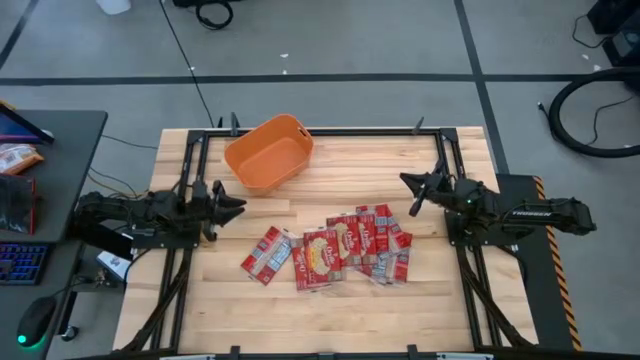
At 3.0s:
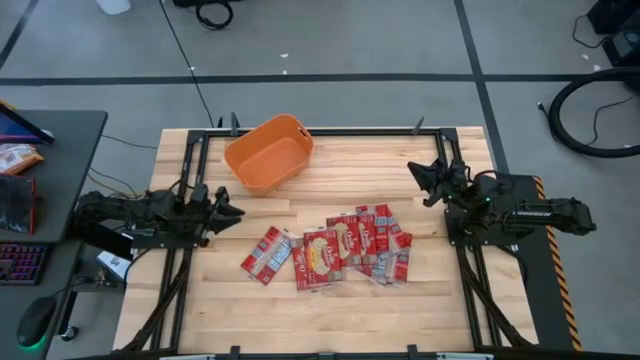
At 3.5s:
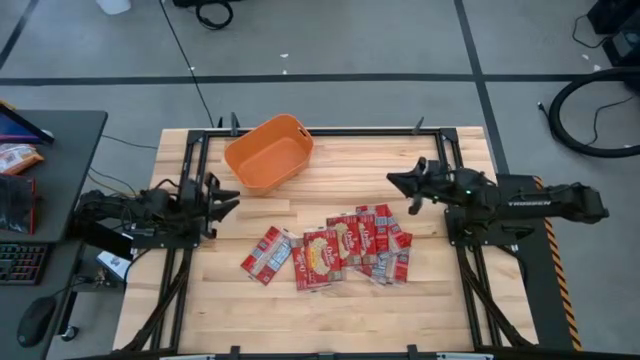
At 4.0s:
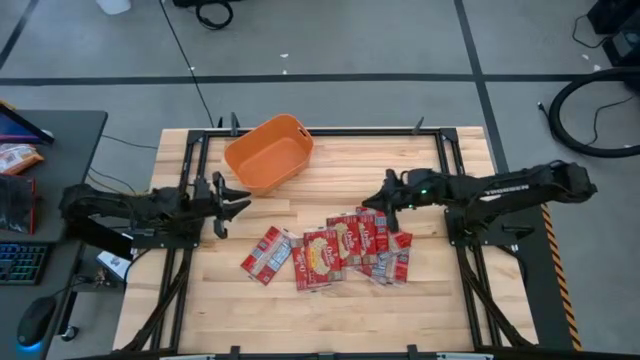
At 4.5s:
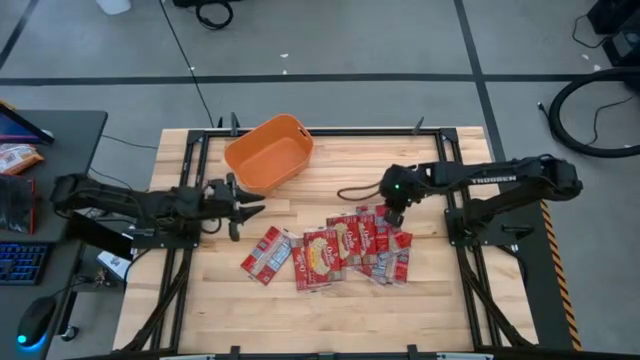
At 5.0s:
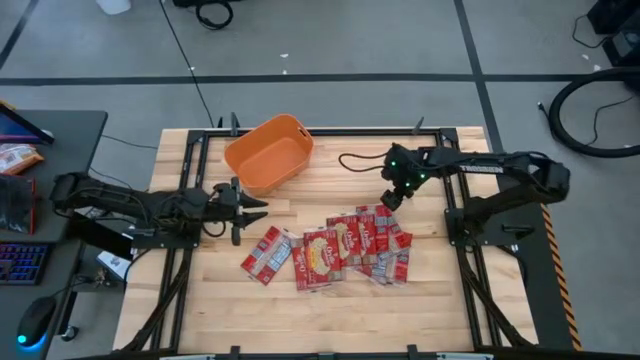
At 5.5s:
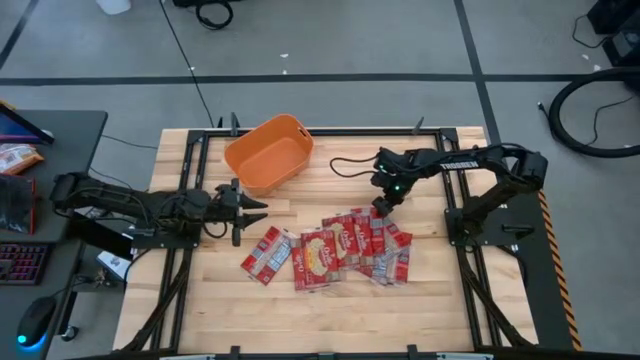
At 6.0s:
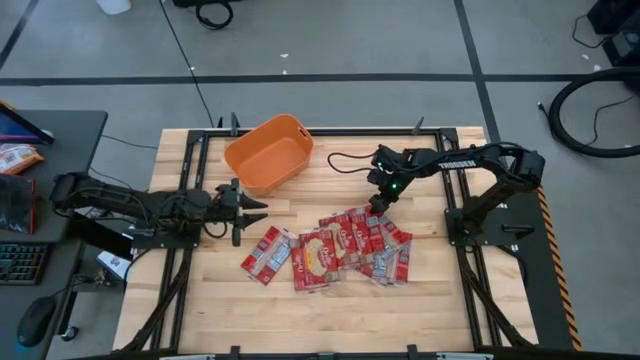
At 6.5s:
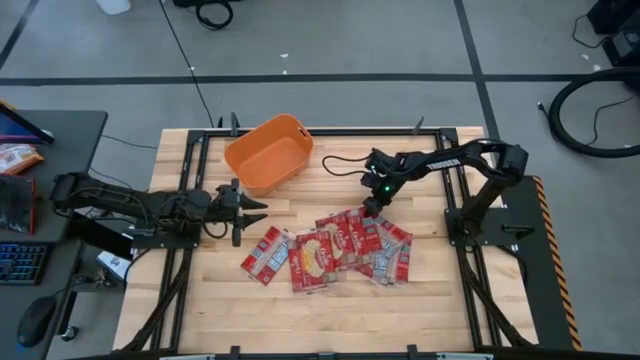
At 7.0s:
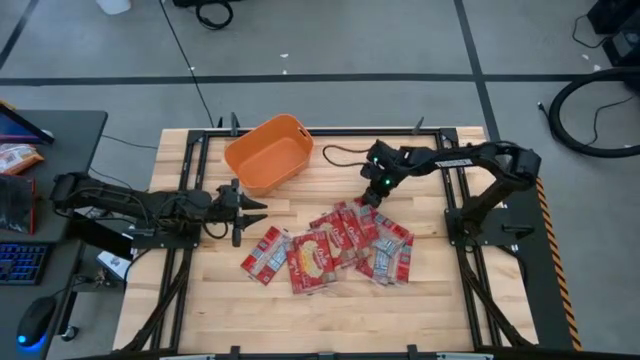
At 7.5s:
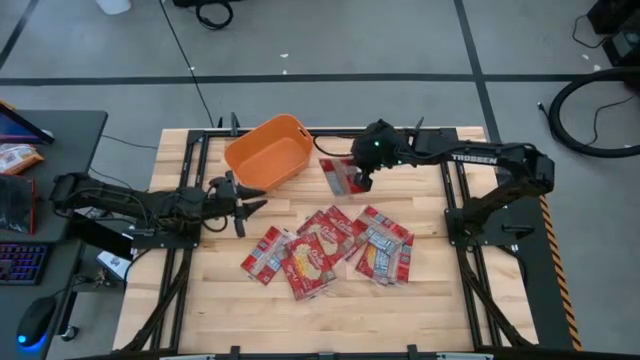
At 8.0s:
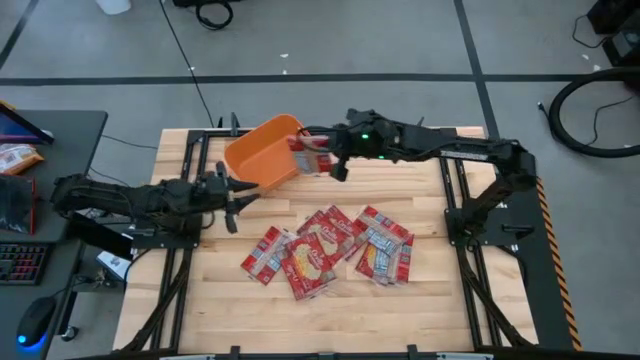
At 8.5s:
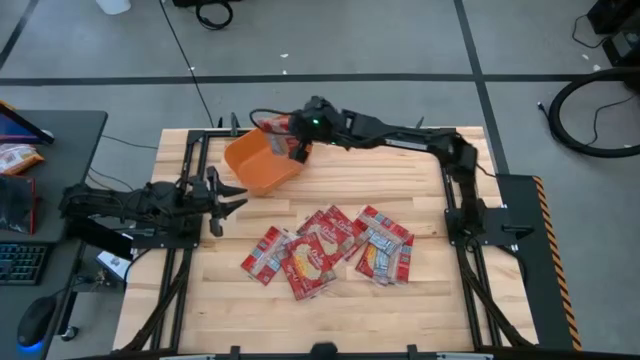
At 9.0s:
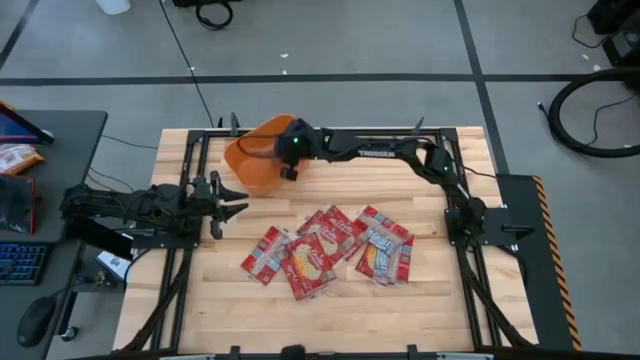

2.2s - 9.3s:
Task: Sort popcorn bags into baskets
Put the red popcorn bag into the orange bin

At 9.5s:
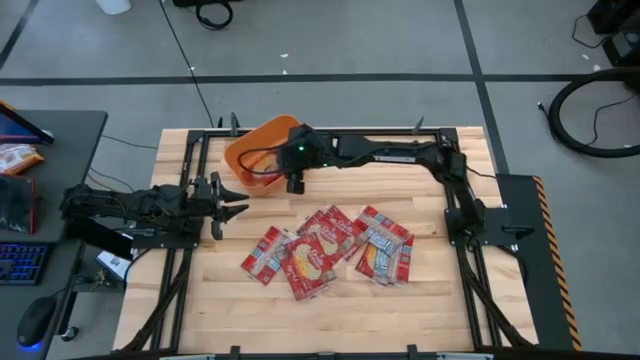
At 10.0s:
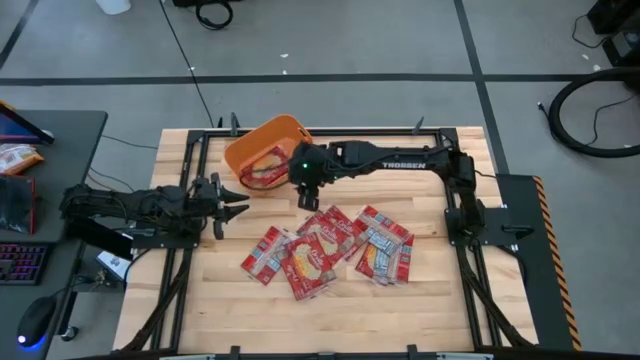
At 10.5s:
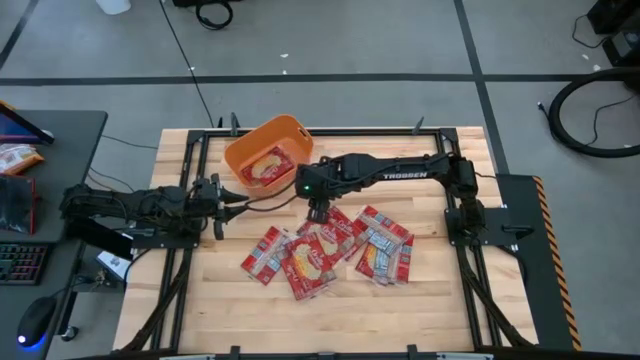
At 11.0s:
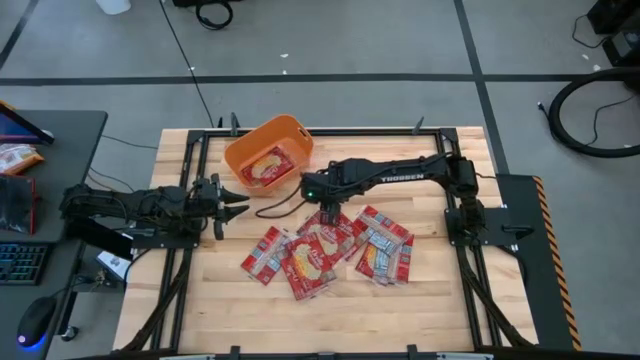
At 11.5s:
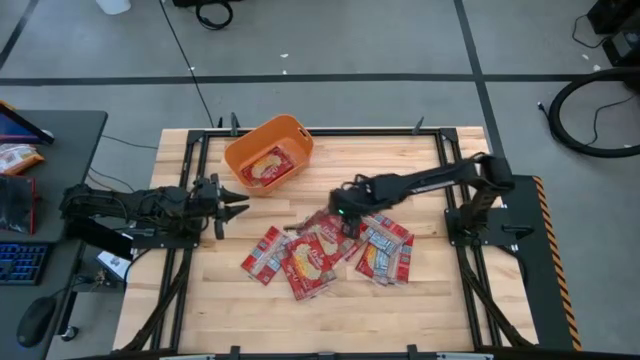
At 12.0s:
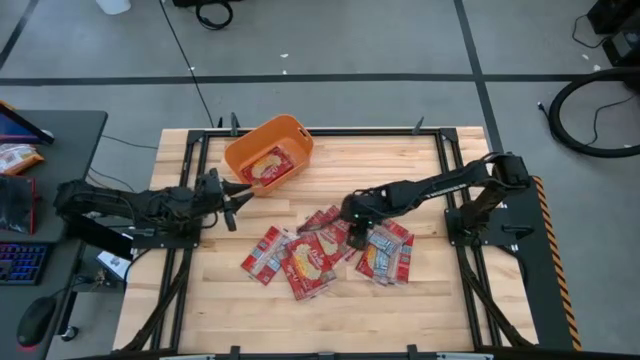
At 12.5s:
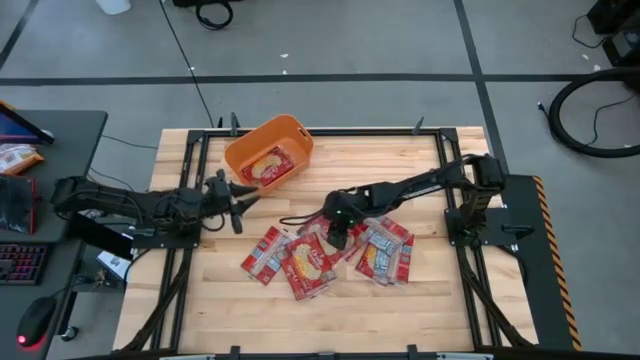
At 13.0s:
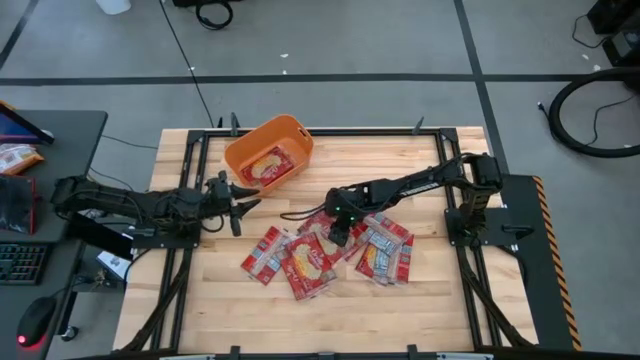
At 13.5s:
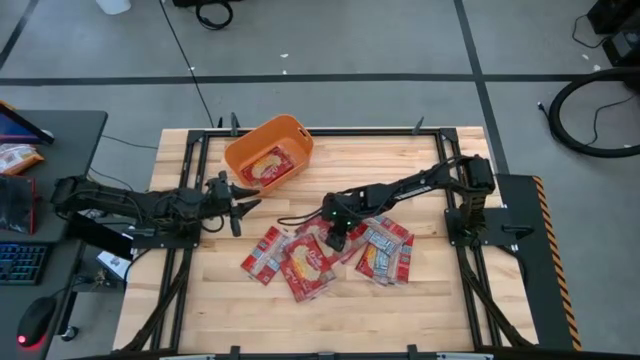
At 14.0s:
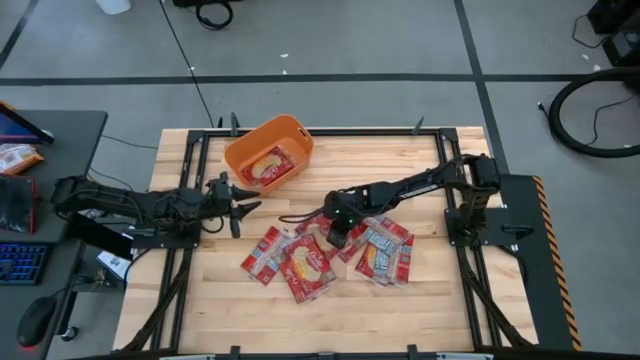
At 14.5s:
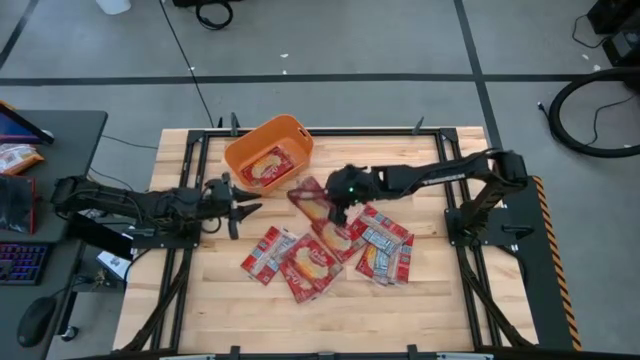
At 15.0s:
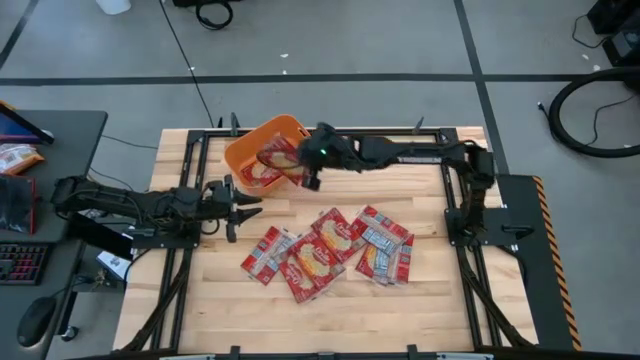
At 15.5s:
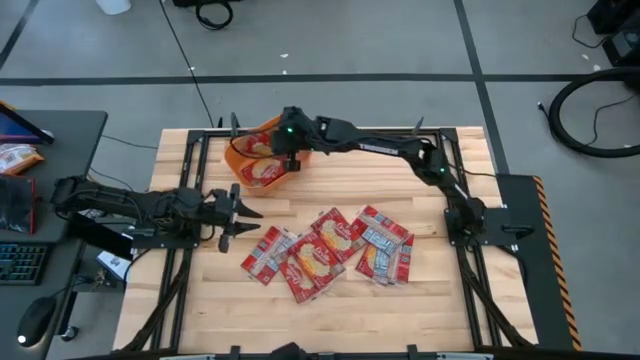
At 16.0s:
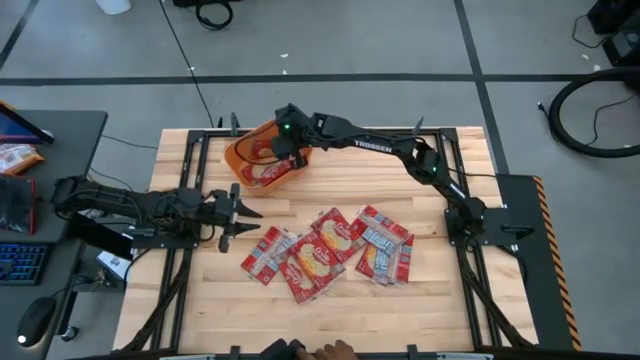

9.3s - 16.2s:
Put the red popcorn bag into the orange bin

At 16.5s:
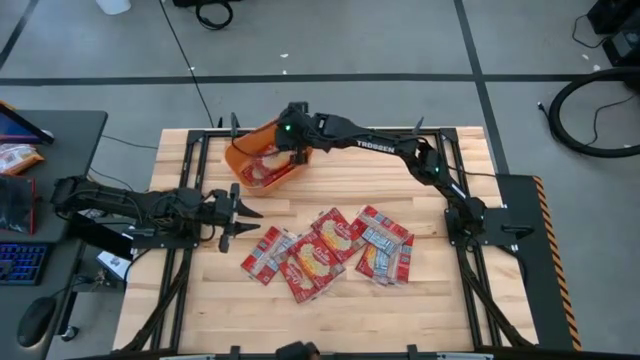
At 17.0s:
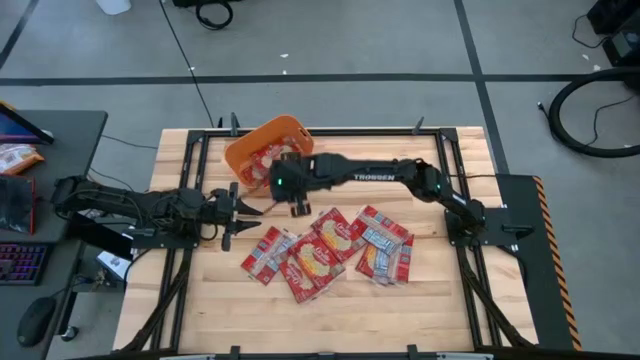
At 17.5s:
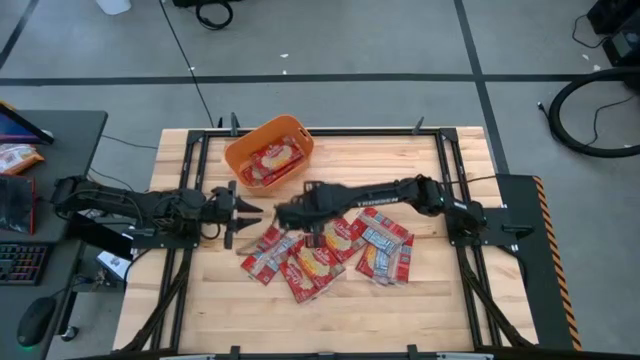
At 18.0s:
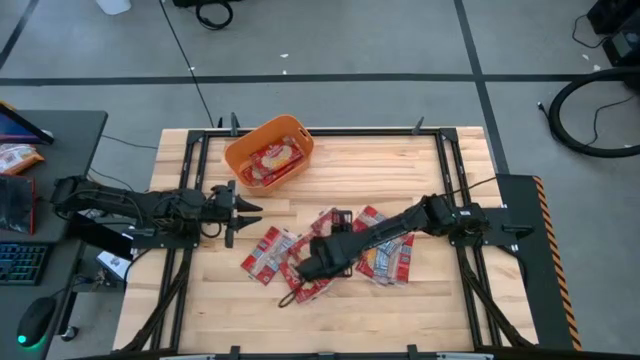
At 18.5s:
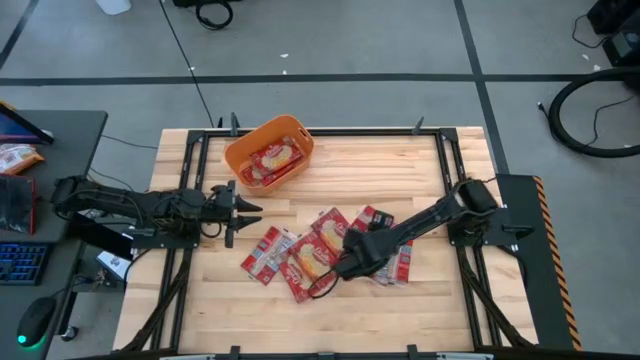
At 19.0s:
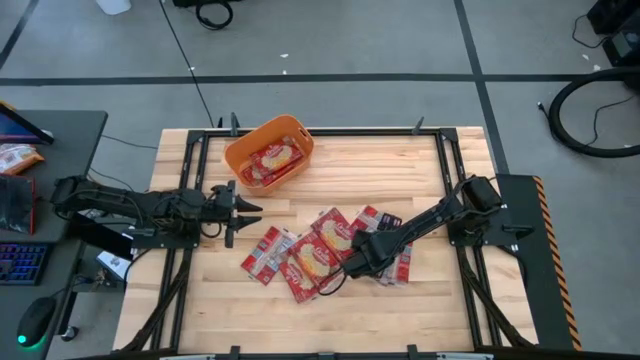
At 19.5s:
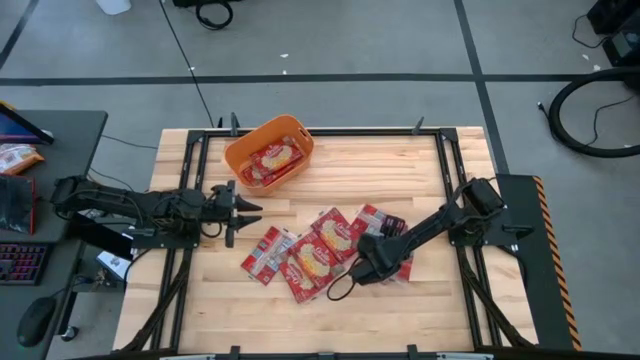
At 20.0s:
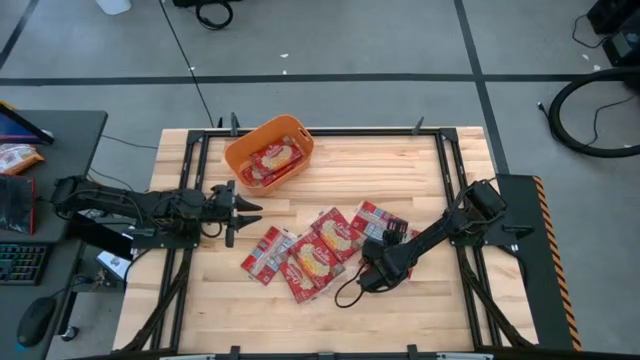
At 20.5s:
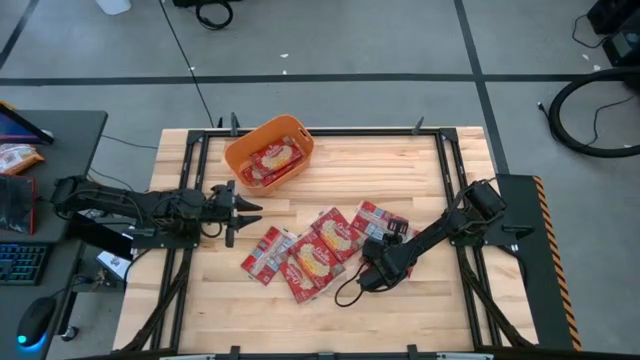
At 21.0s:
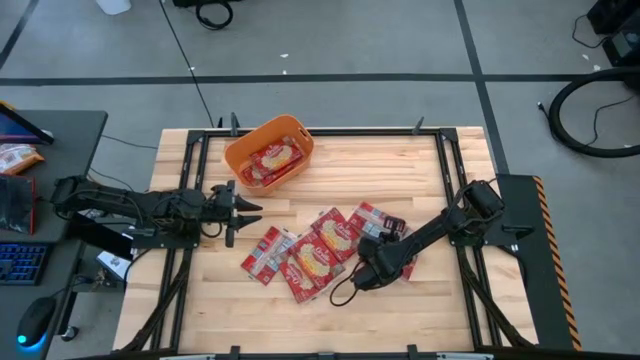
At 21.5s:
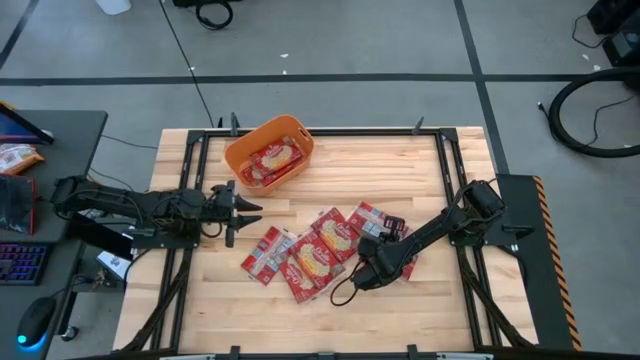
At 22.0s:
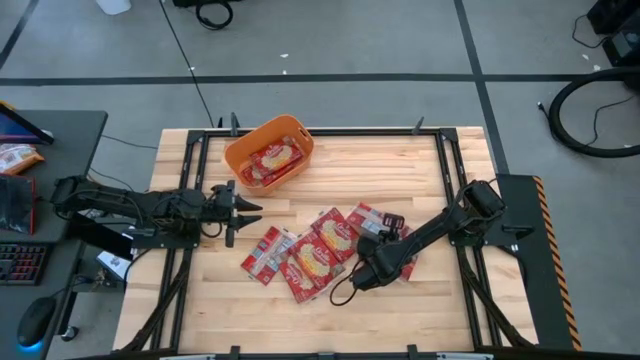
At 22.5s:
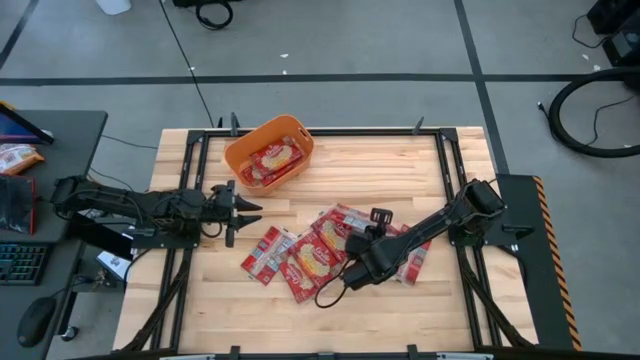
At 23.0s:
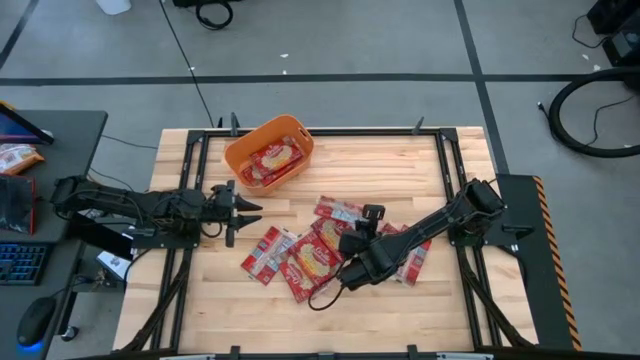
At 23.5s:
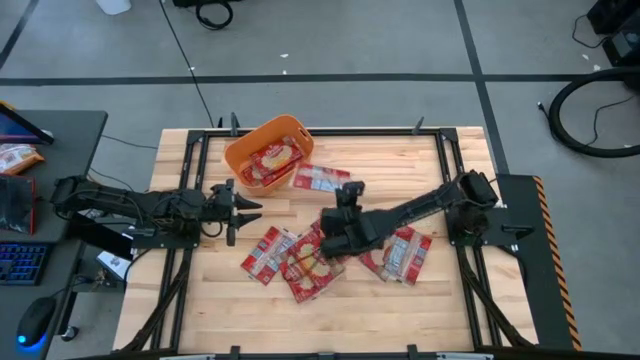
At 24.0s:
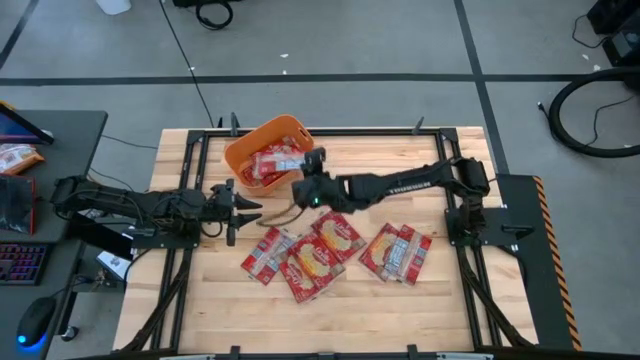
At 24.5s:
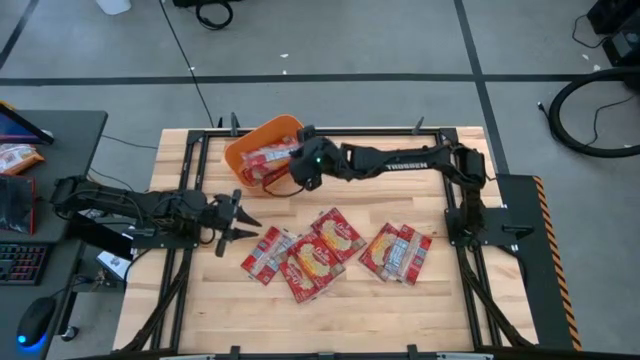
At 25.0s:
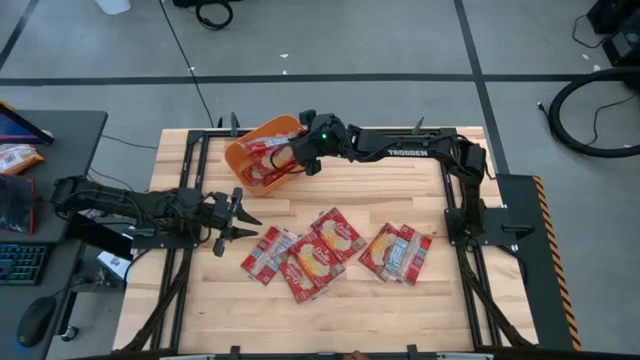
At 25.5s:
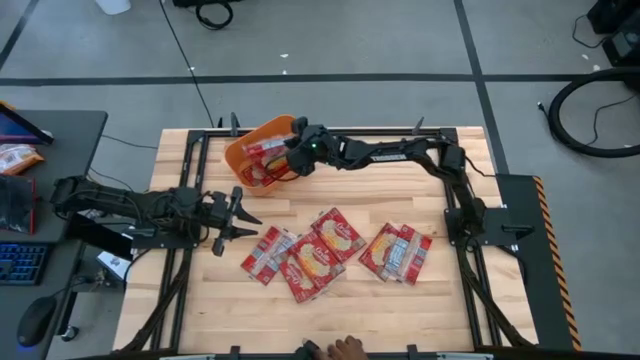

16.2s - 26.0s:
Put the red popcorn bag into the orange bin
